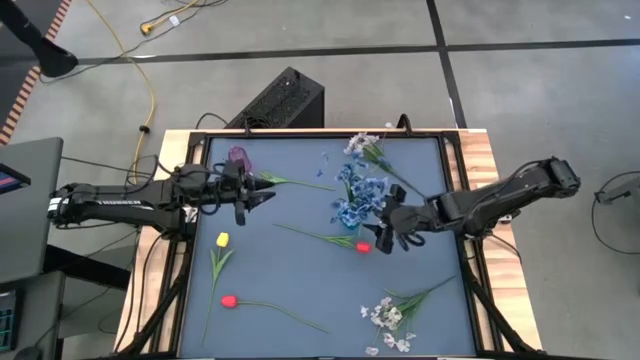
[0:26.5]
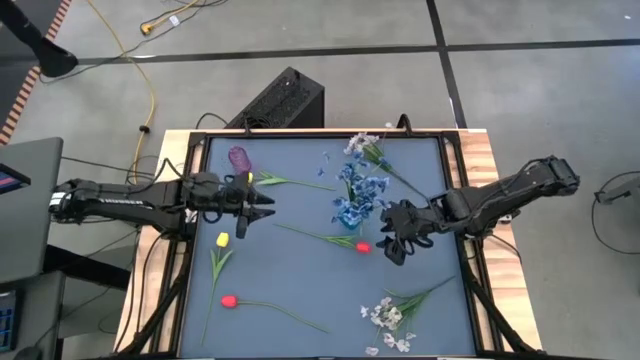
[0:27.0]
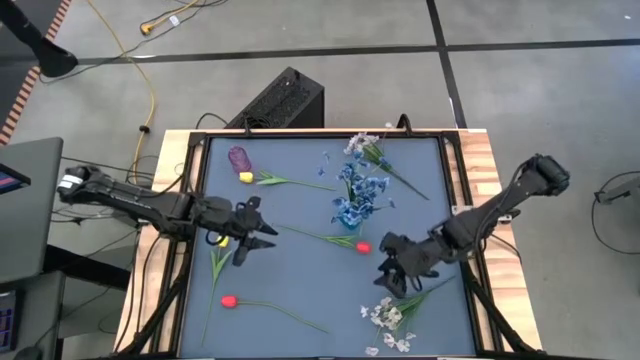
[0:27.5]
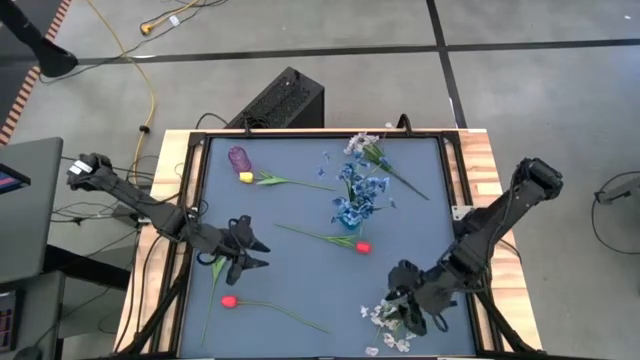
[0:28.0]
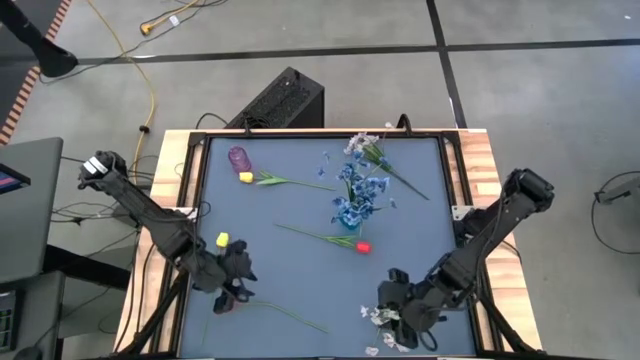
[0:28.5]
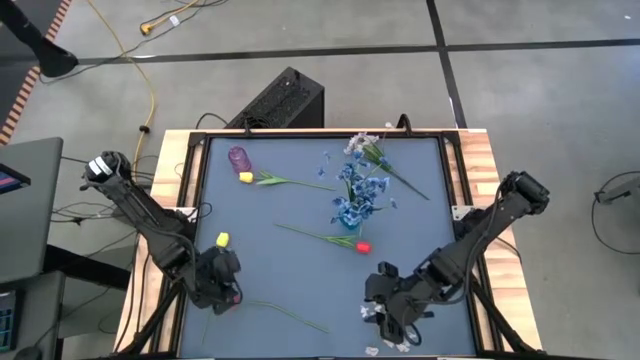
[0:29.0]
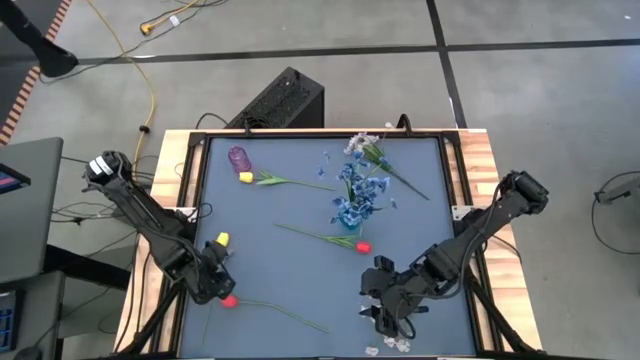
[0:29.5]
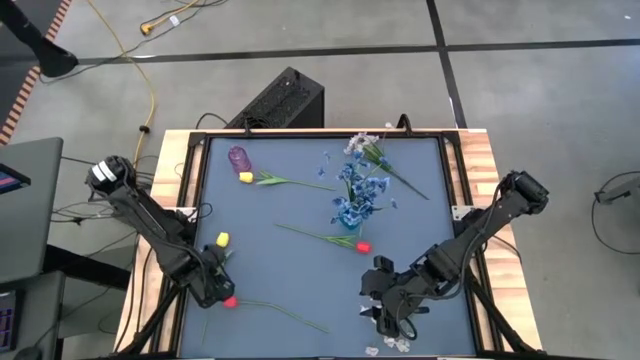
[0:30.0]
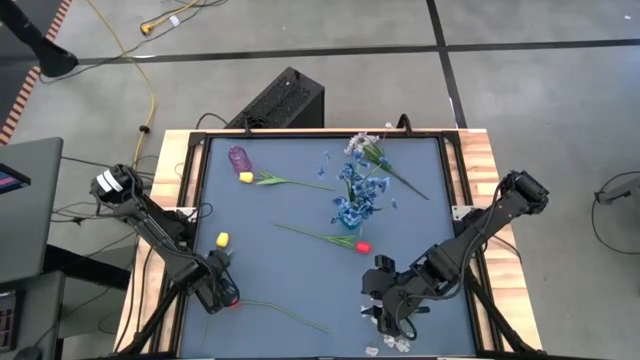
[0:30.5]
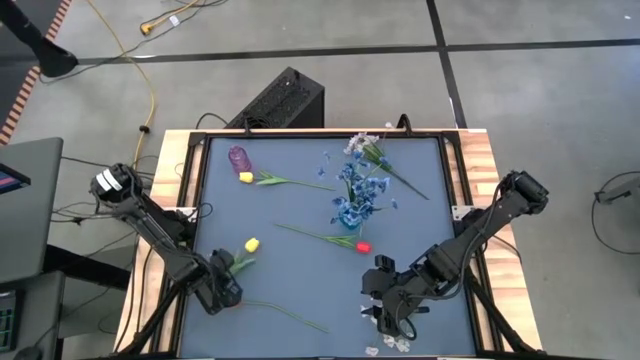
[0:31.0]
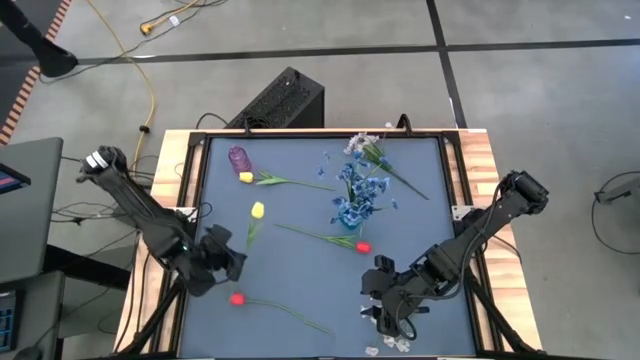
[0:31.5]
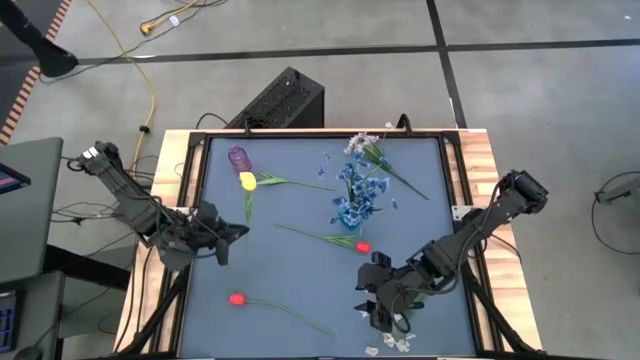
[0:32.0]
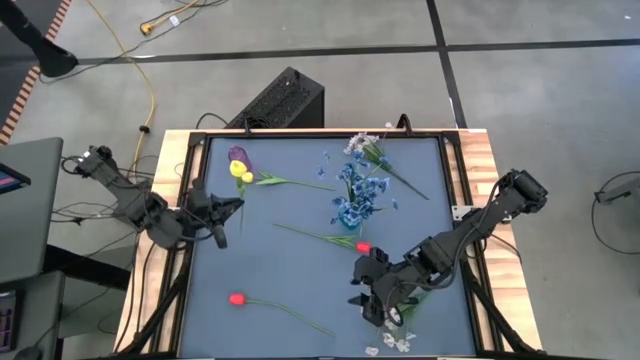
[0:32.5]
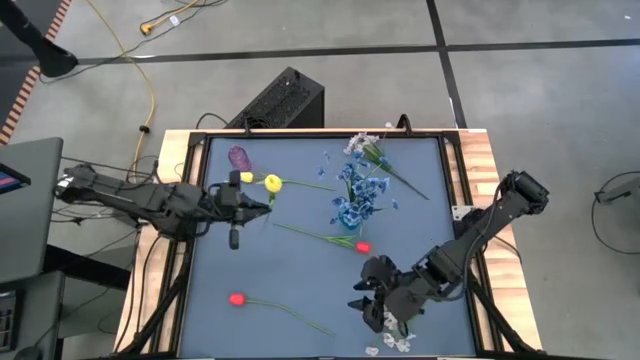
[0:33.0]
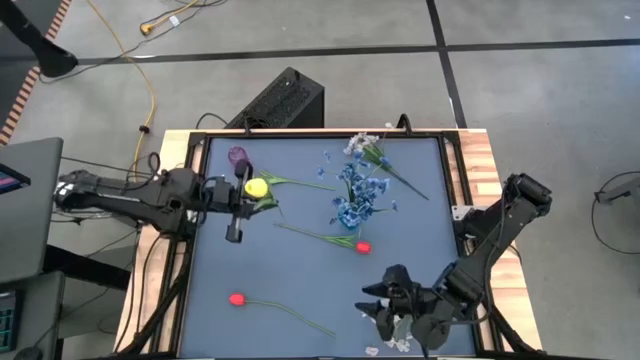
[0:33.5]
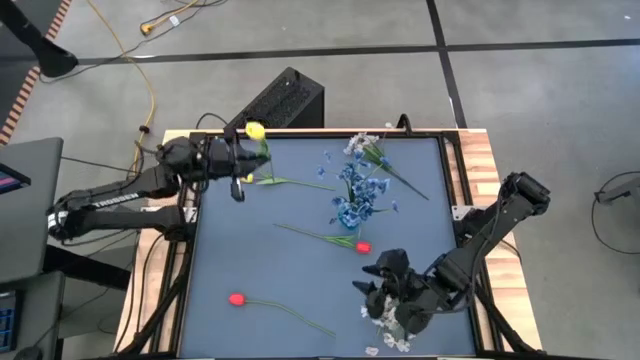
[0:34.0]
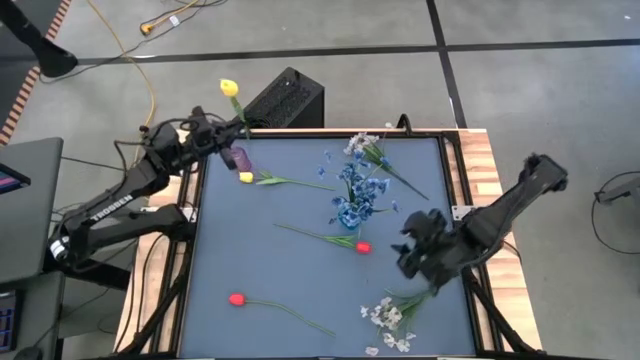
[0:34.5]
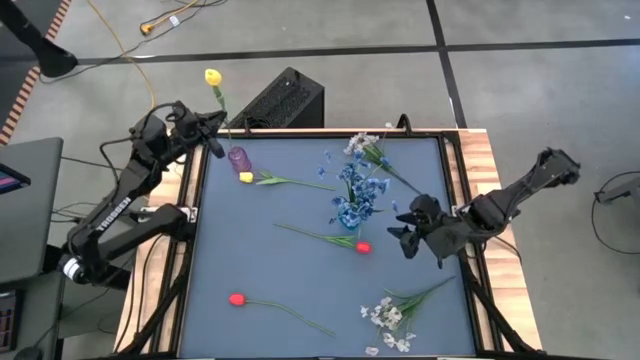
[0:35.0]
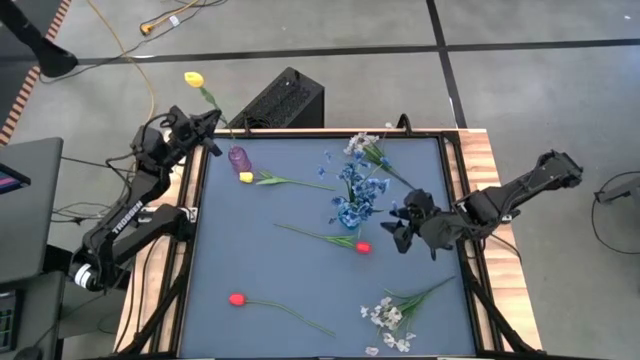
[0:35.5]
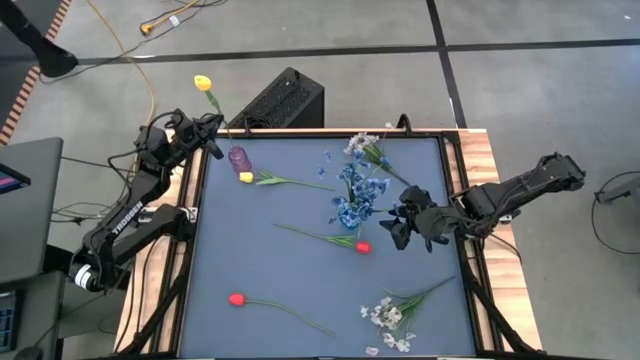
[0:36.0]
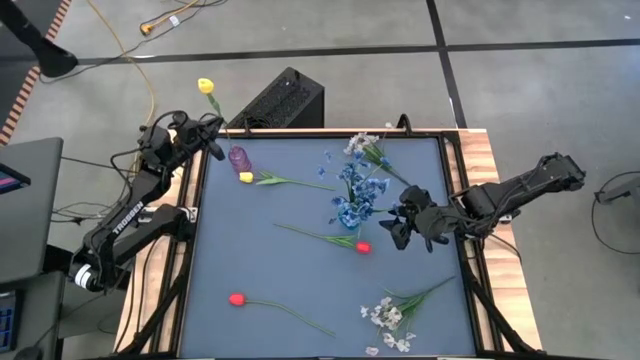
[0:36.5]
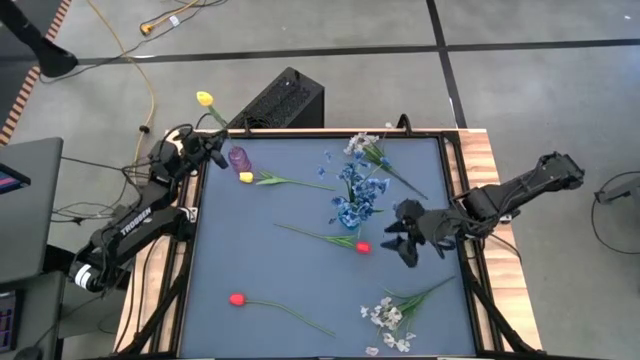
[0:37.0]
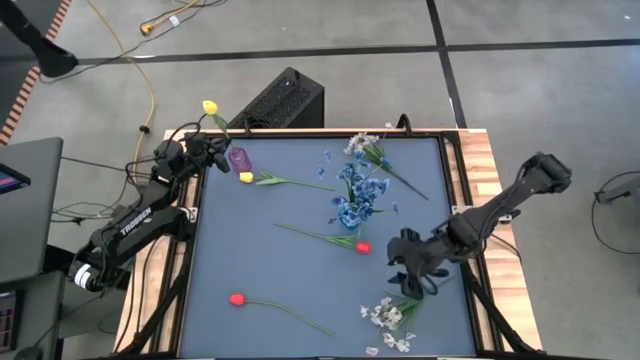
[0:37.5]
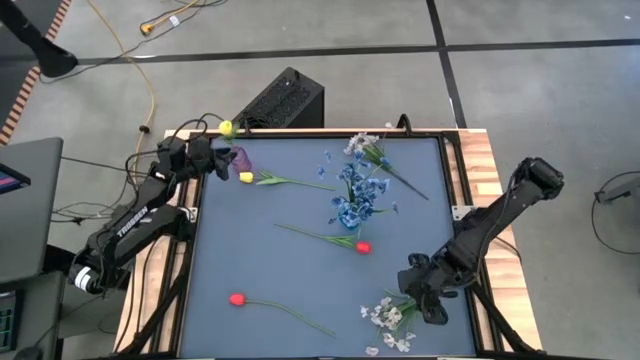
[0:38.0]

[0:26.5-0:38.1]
Task: Sort flowers into vase by color
Put the bottom yellow flower into the purple vase

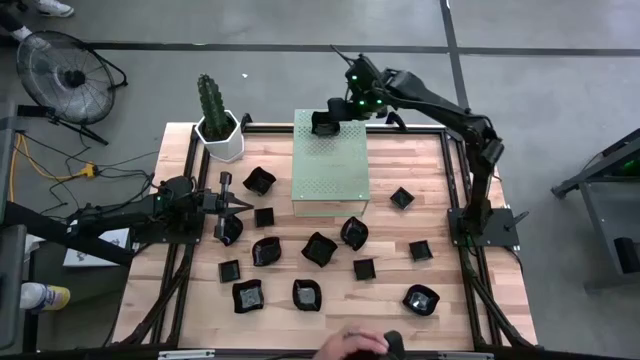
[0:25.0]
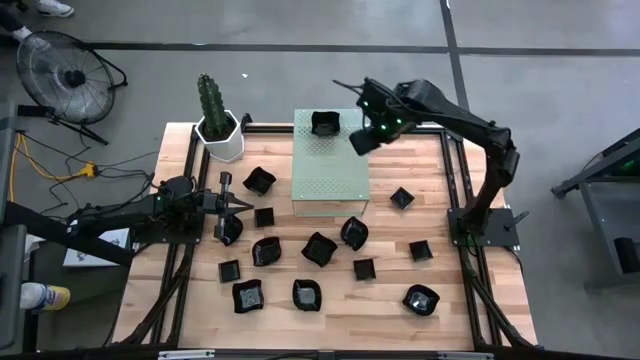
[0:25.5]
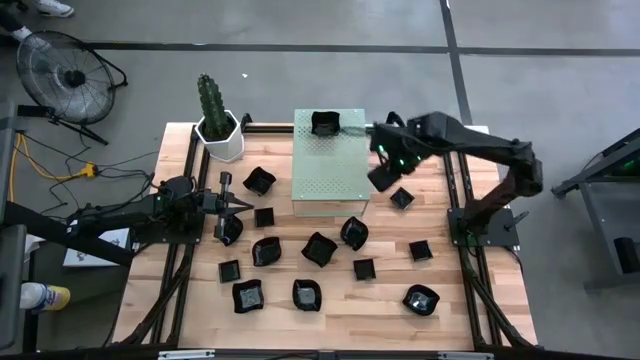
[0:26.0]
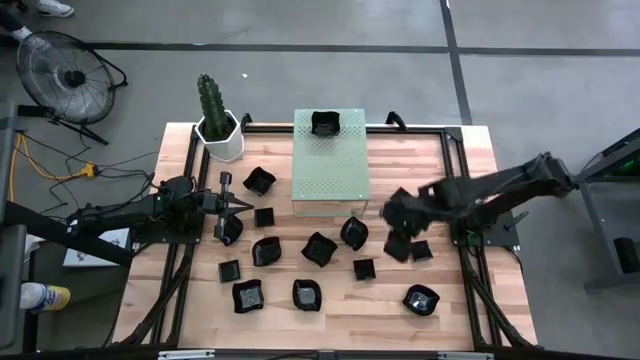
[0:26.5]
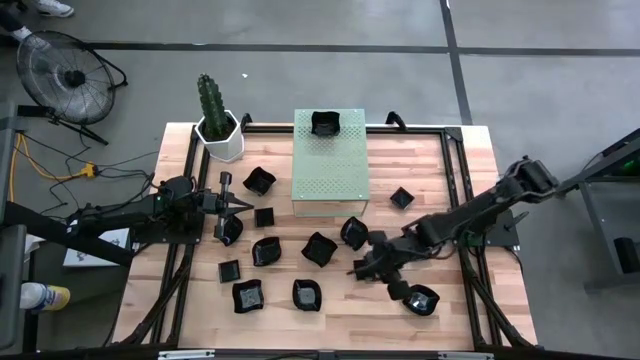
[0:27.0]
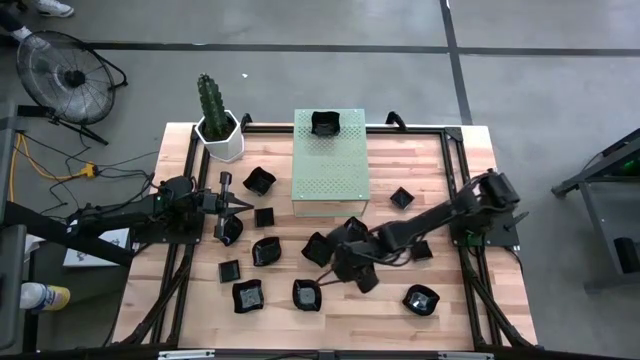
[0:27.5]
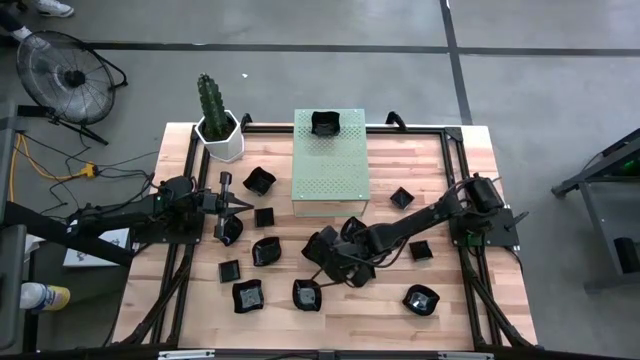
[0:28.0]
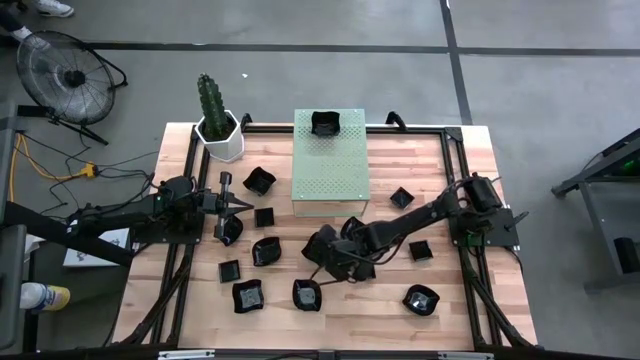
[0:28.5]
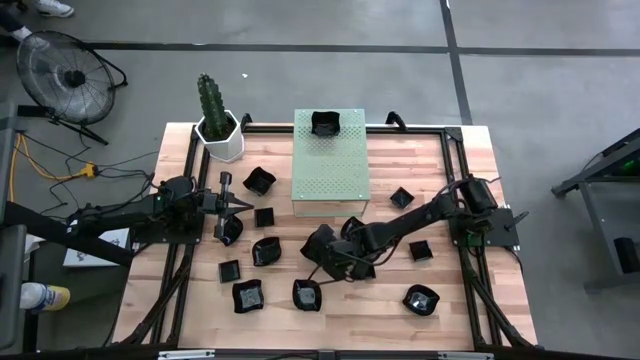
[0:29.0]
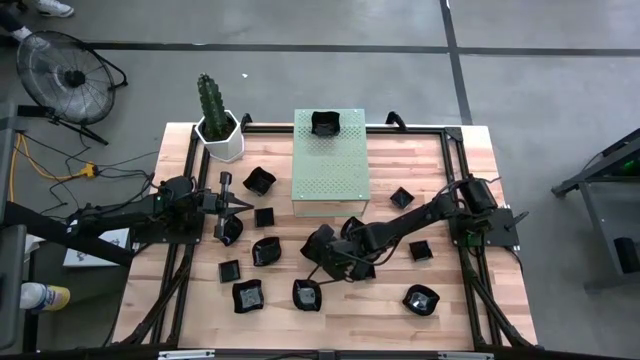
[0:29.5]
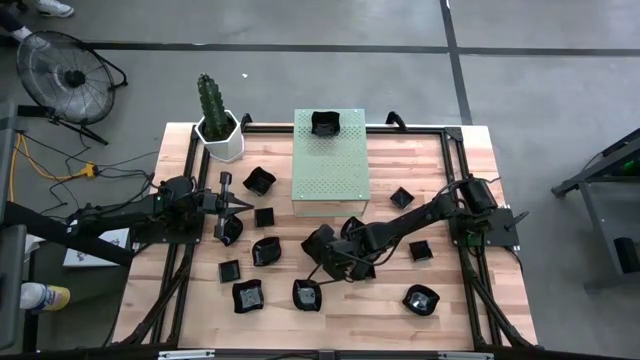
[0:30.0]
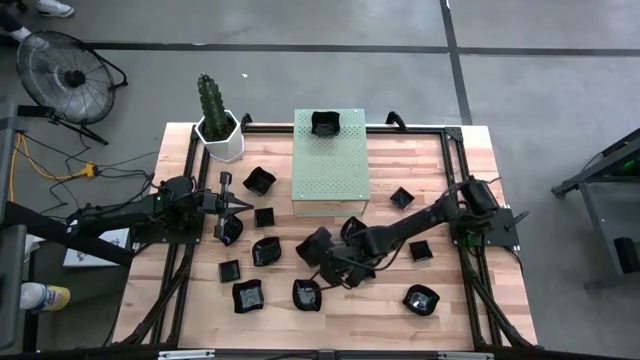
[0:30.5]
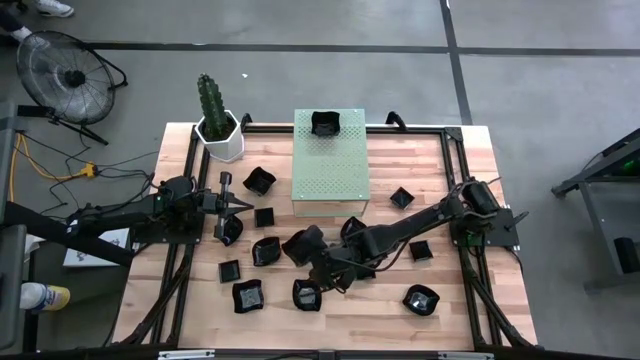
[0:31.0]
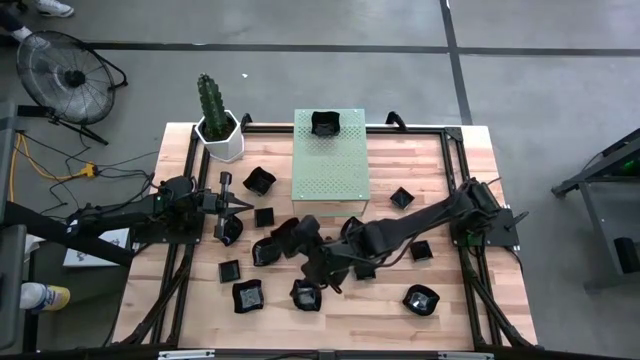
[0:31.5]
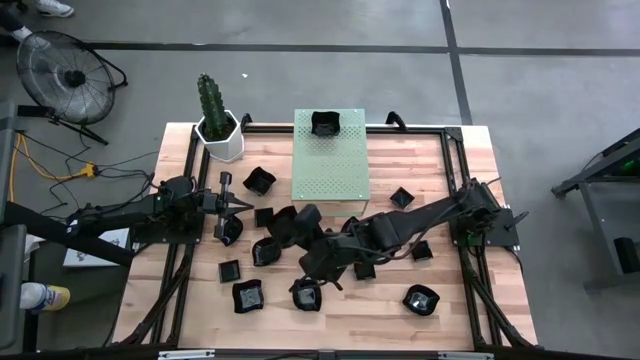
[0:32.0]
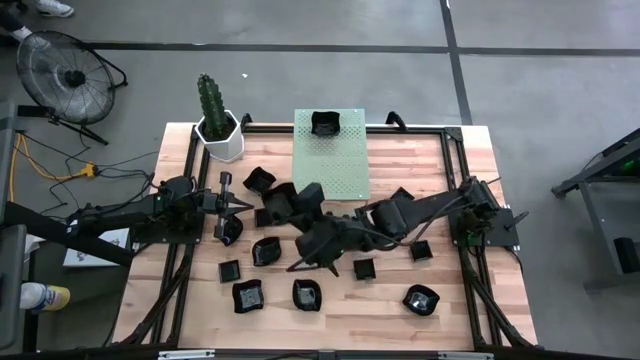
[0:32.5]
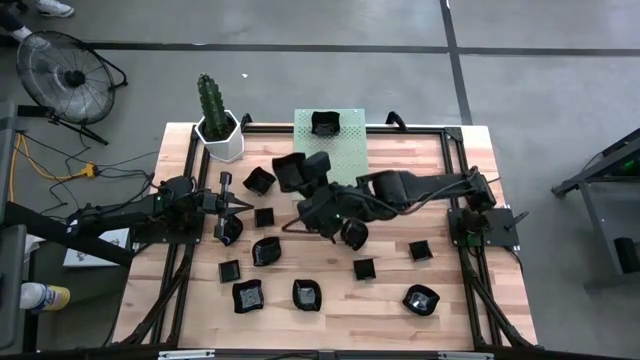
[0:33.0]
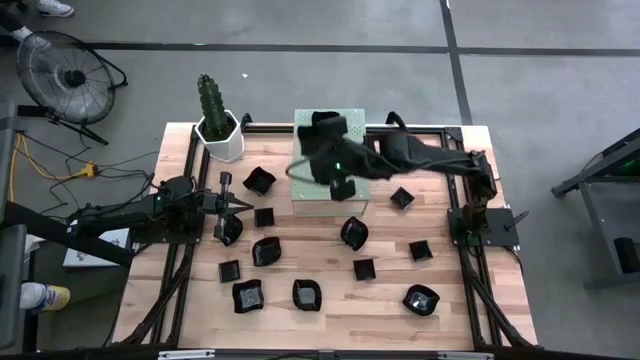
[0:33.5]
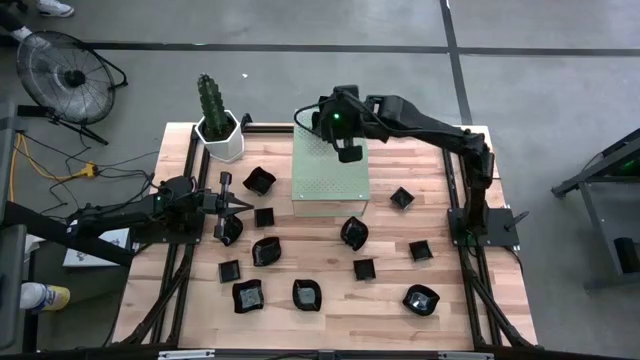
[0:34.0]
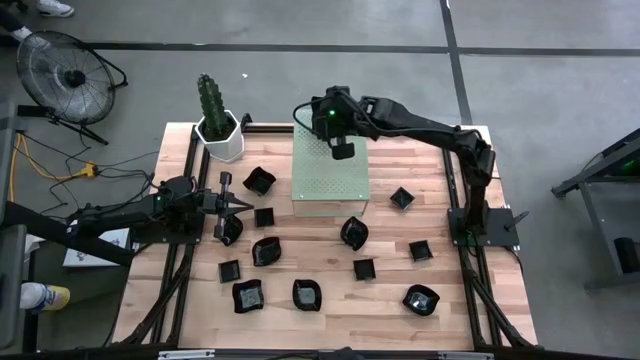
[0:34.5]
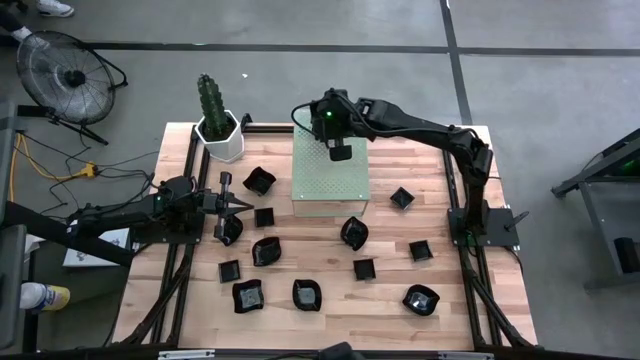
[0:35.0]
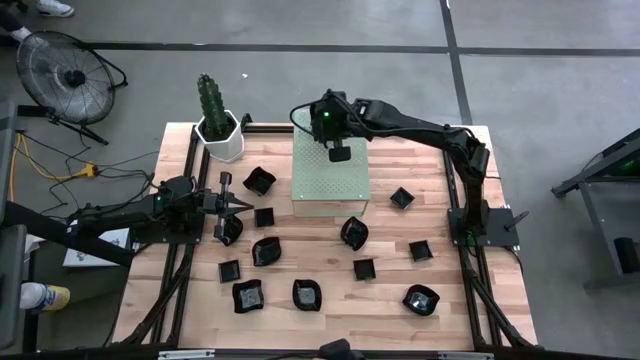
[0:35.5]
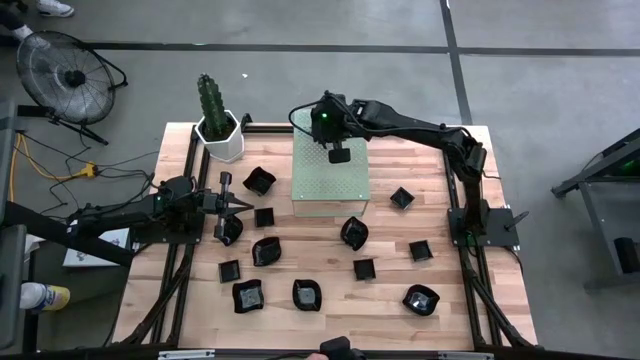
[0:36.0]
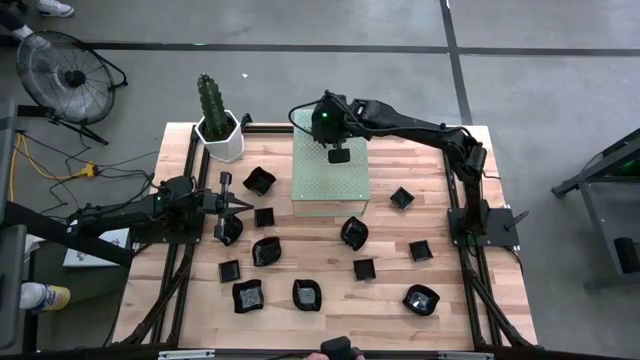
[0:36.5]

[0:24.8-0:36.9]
Task: Pick & Place Mini shaped plates
Stack the black distorted square plate on top of the black distorted square plate on the shelf
